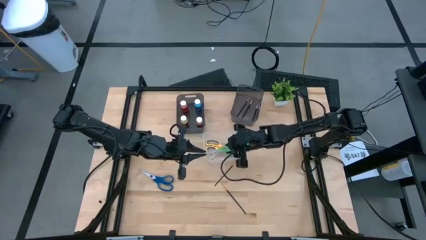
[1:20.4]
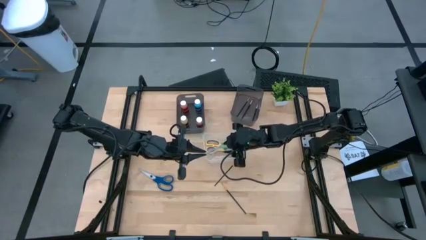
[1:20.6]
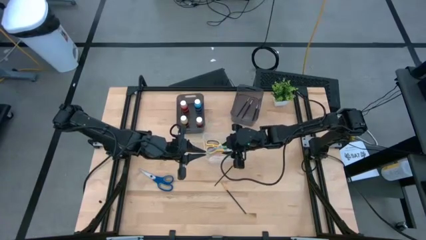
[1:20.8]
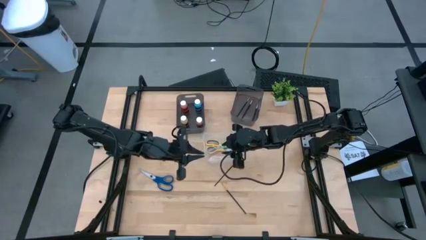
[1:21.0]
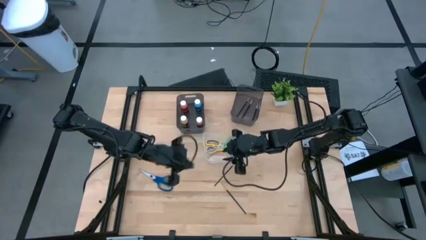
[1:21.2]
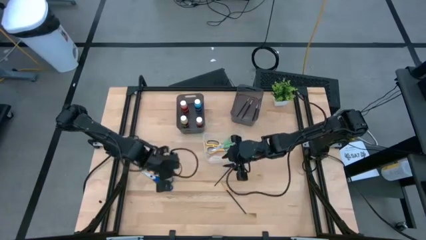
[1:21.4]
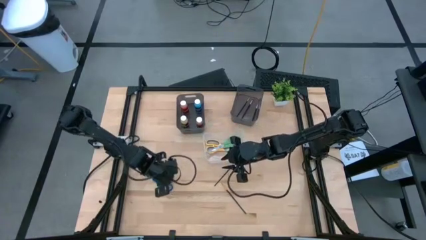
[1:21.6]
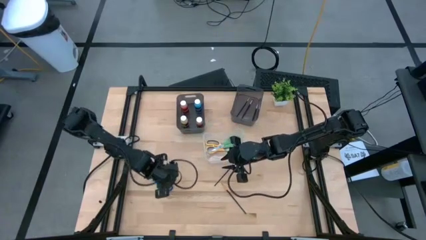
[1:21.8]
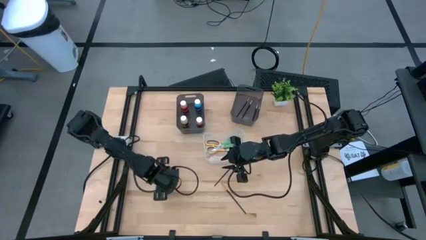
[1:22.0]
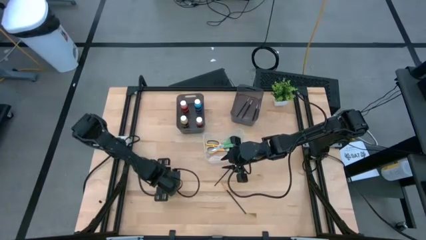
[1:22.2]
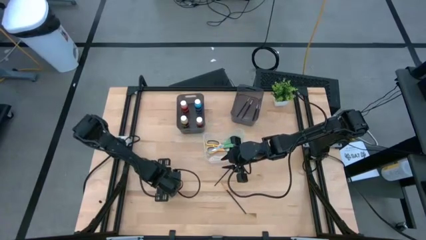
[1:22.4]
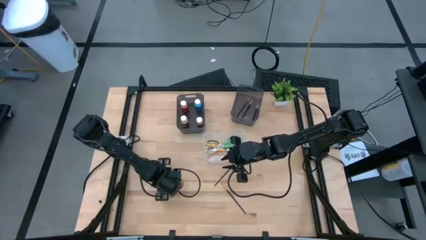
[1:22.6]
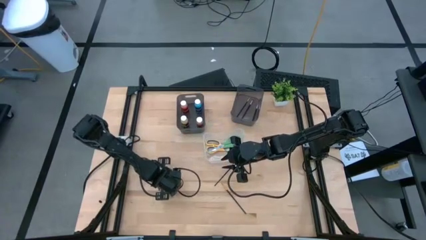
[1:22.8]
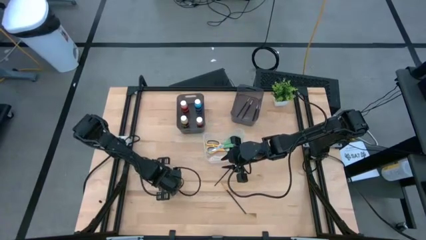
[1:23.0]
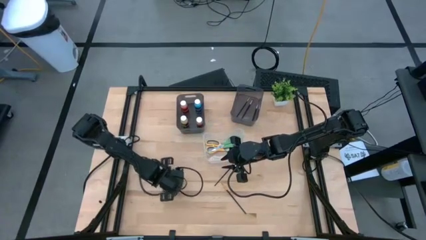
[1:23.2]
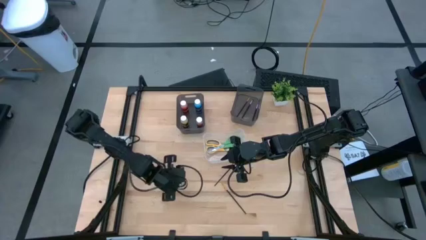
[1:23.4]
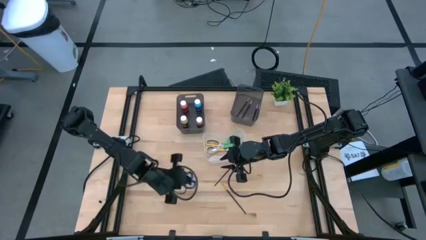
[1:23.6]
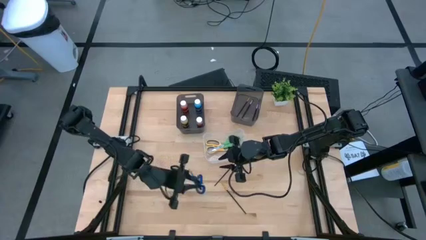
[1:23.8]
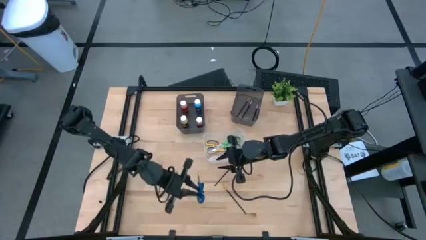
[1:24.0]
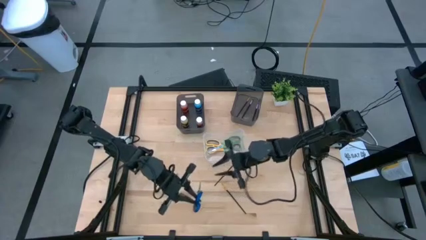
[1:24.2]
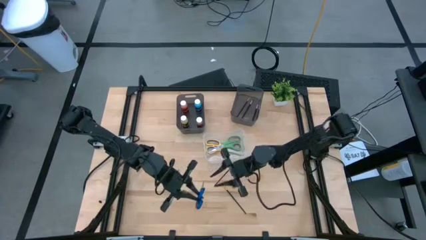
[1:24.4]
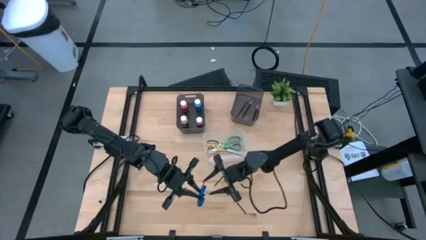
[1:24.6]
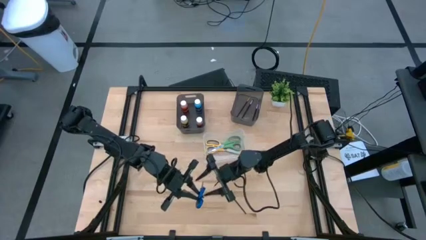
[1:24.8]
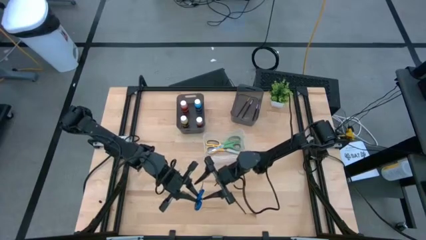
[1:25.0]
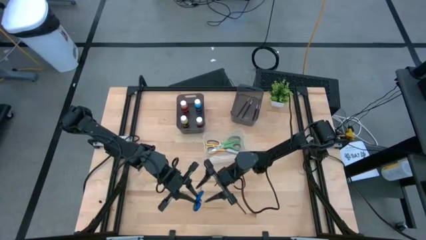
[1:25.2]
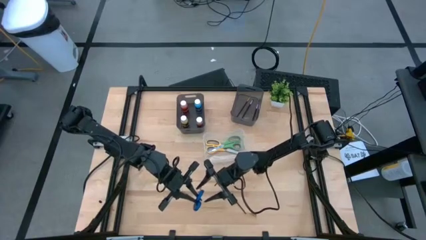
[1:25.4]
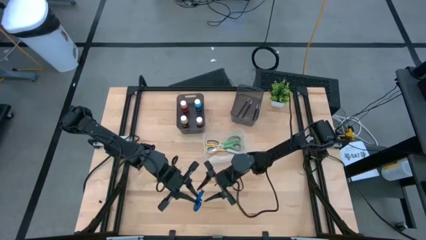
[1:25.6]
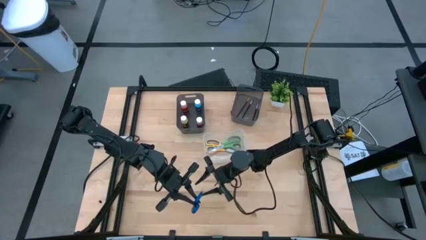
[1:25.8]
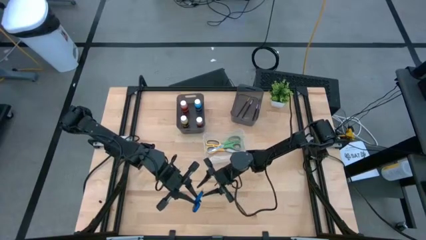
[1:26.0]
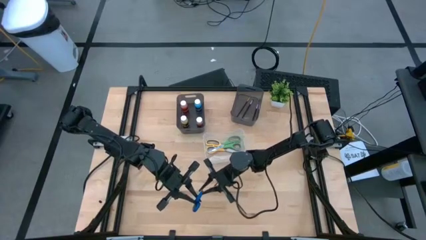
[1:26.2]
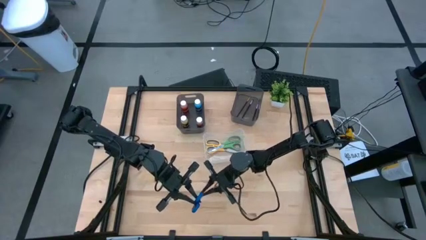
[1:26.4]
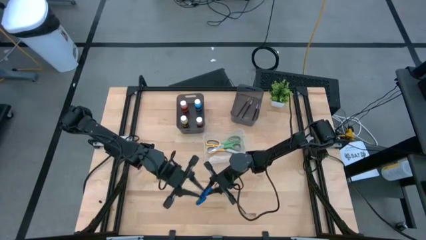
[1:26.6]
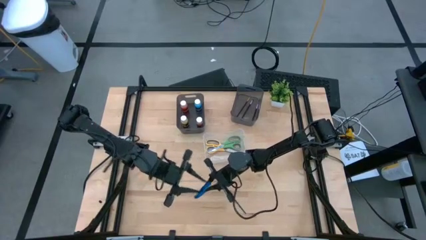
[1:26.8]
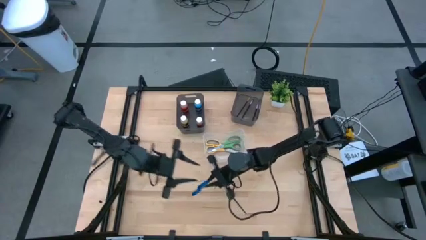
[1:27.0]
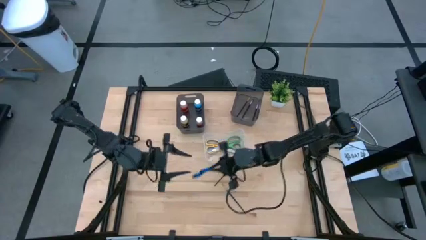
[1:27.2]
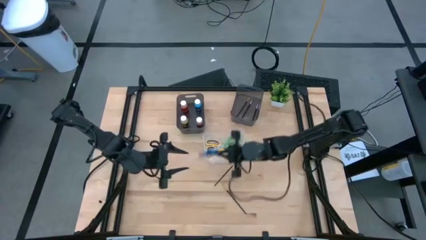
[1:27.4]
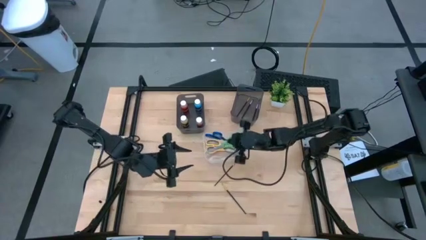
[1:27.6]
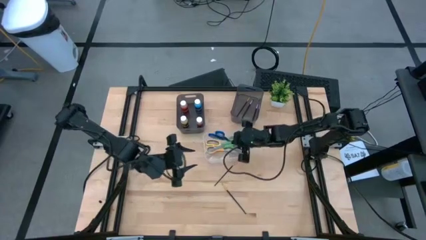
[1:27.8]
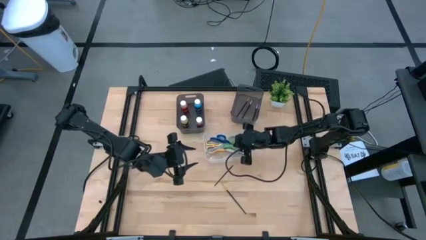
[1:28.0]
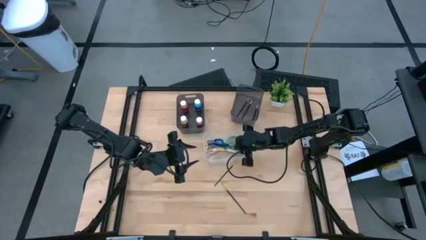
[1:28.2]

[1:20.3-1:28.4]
Task: Pick & Place Paint Supplies
Put the blue scissors into the transparent bin

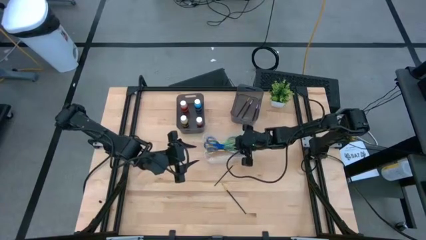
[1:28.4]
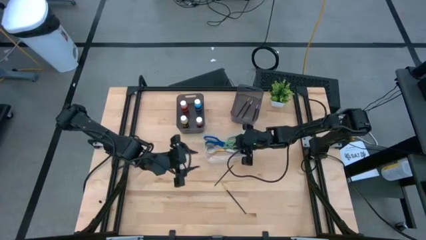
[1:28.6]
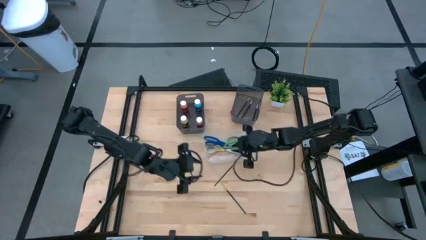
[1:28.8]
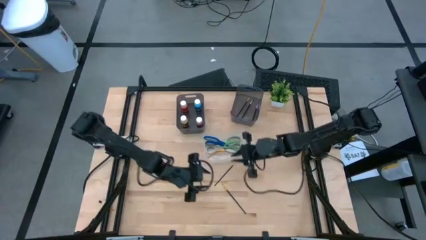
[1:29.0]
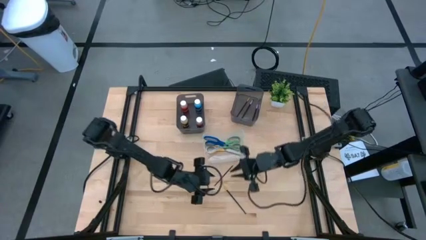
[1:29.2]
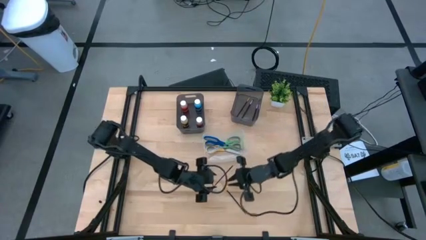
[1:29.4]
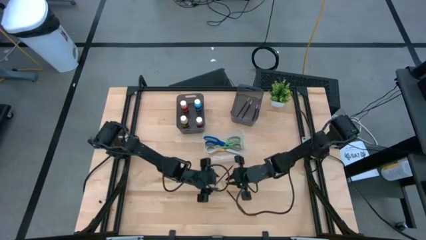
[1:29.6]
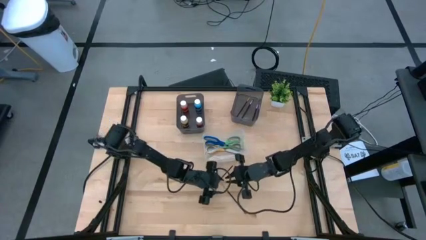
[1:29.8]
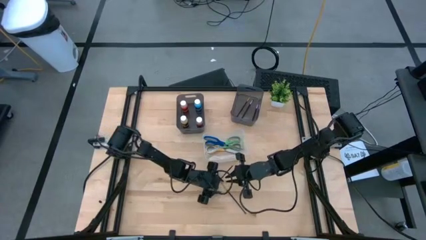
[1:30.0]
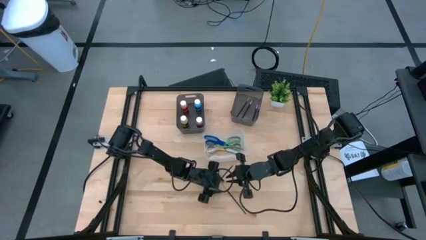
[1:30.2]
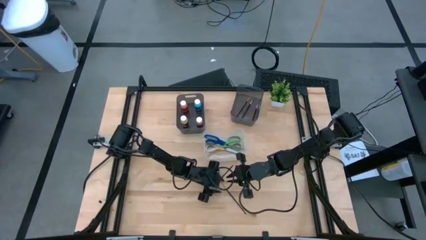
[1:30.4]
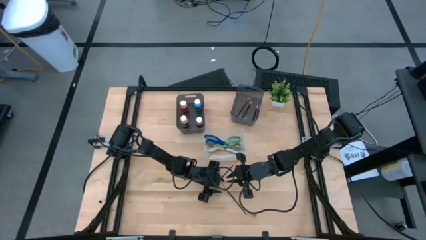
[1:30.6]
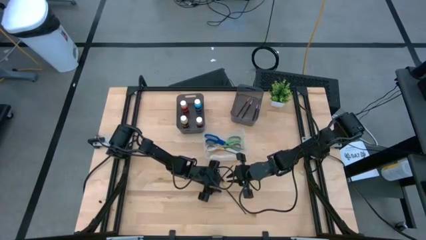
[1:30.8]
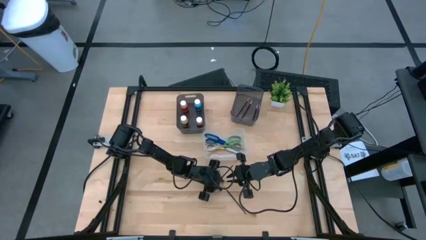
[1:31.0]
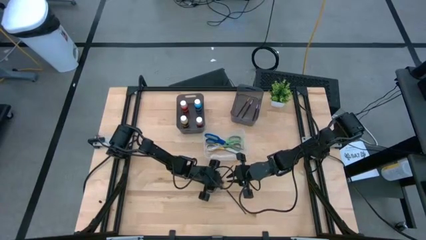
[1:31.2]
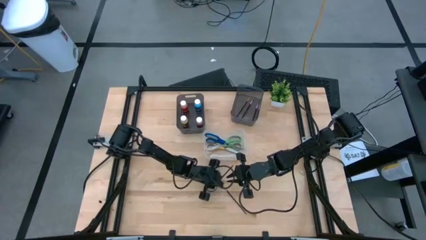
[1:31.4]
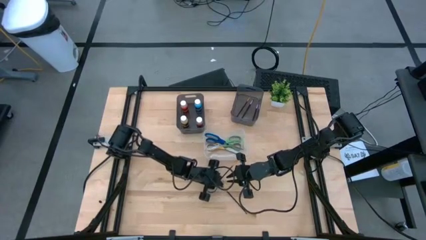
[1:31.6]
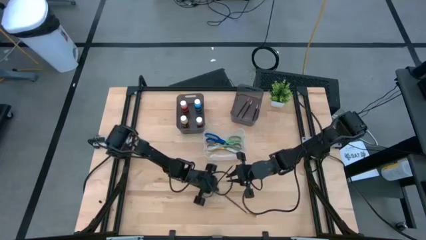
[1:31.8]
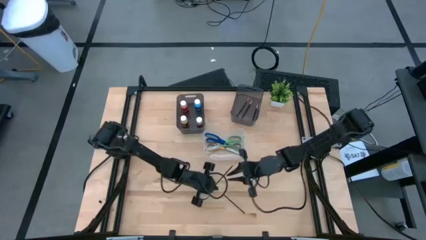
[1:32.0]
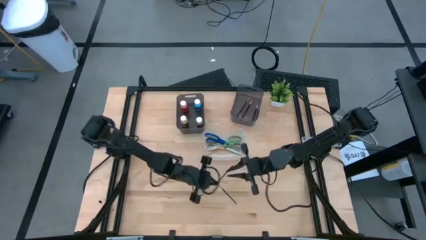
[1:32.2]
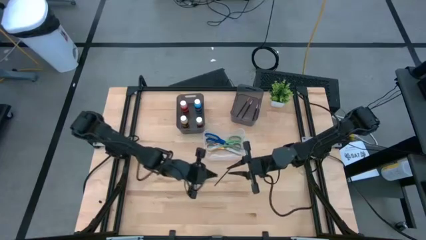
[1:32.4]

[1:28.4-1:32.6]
Put the bottom black and gold brush into the right black bin

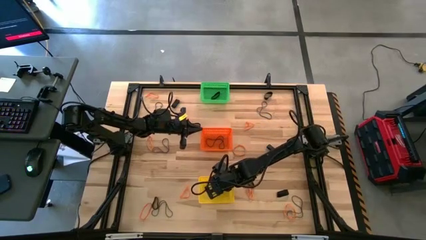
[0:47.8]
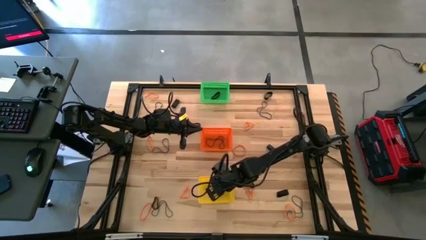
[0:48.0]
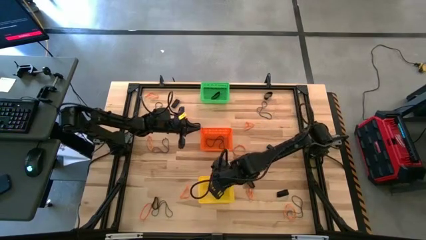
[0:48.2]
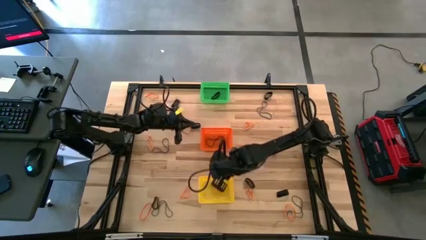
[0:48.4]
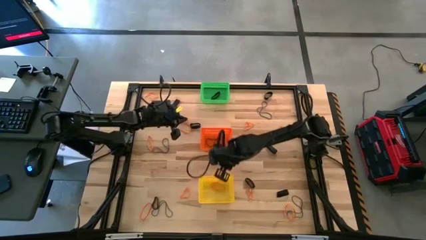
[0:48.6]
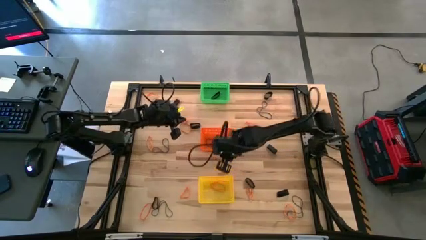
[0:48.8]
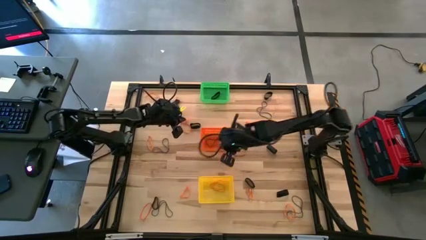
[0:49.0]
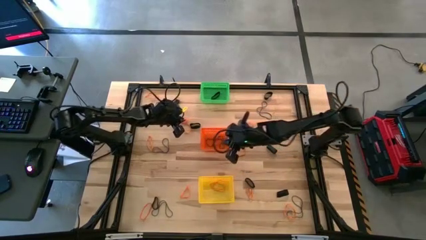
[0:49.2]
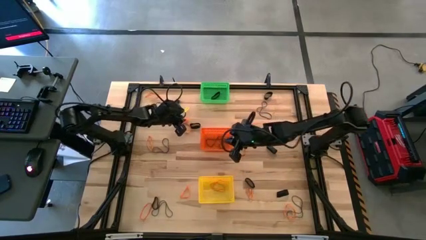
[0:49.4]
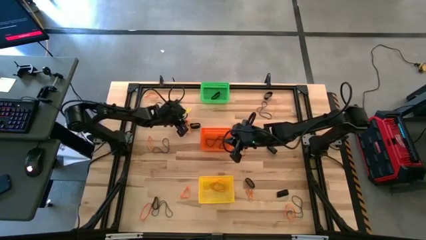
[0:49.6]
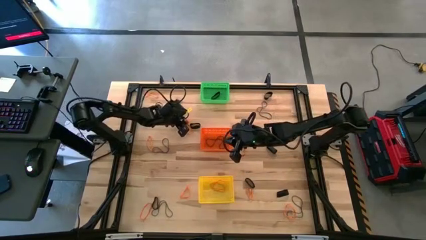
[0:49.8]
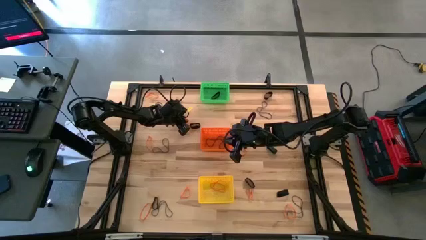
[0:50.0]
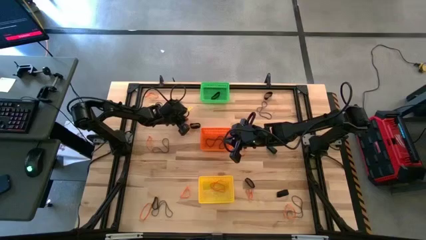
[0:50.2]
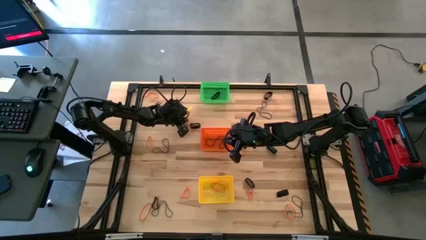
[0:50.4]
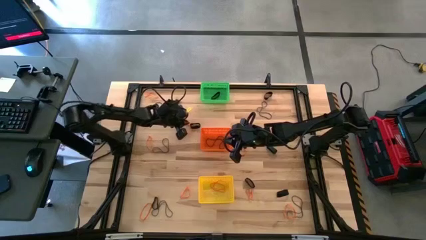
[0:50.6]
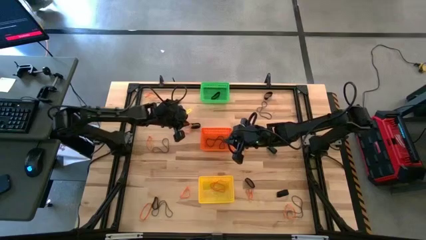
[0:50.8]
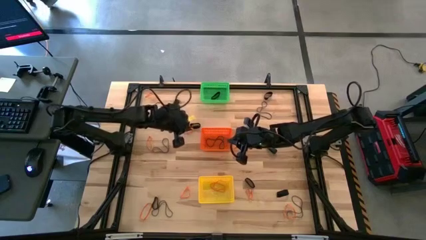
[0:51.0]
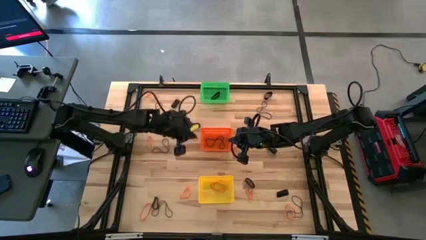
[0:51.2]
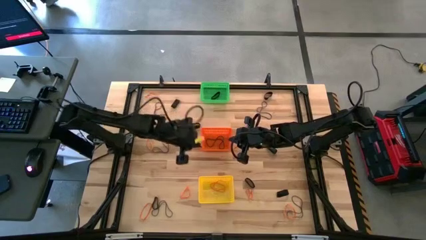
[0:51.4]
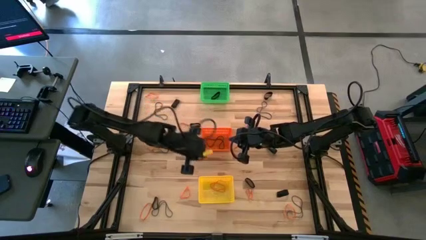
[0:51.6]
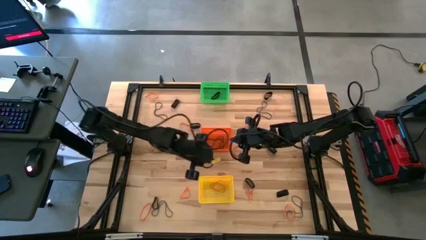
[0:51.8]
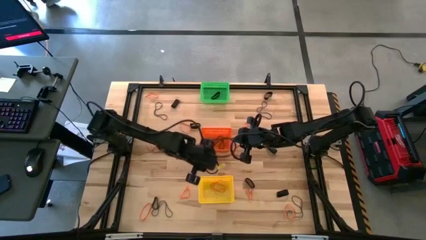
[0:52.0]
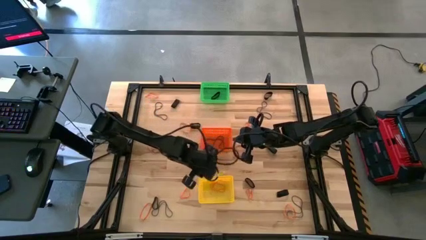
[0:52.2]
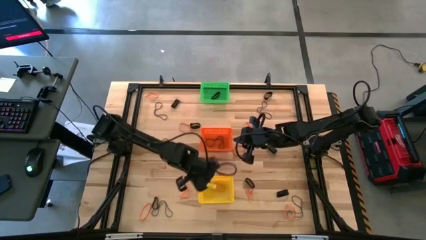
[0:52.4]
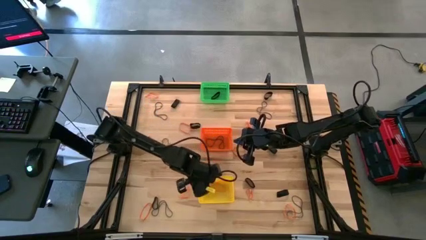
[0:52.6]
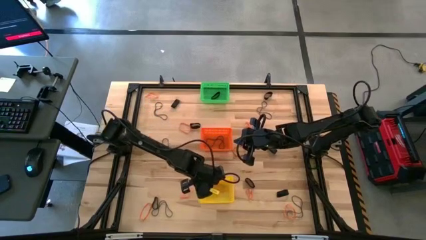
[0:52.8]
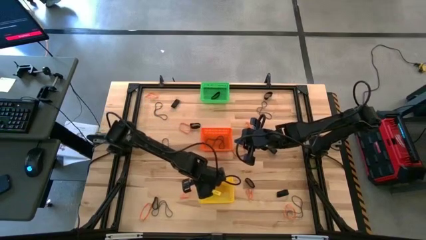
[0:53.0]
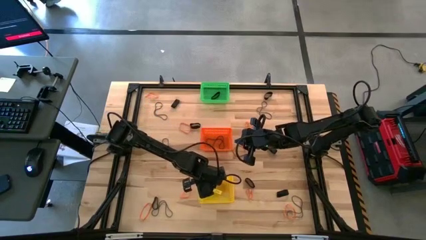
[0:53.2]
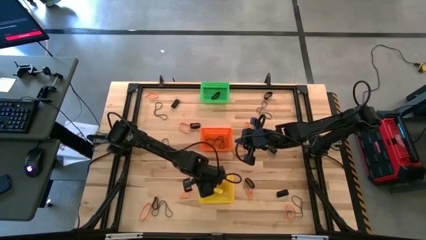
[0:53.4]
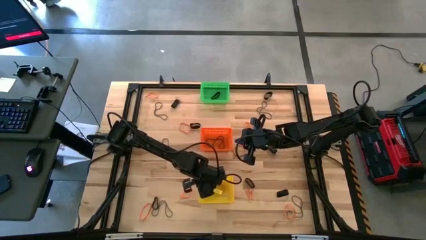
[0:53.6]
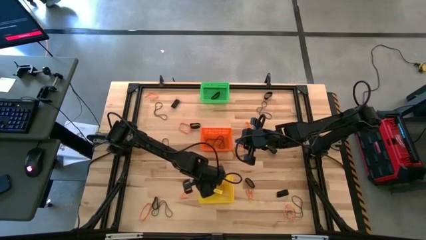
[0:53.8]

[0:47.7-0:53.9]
Task: Sort rubber bands into baskets
Put the orange rubber band into the yellow bin
